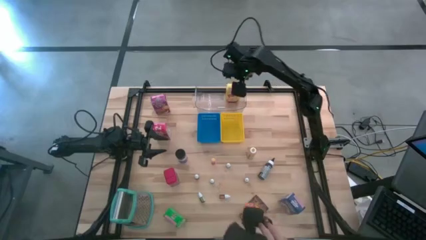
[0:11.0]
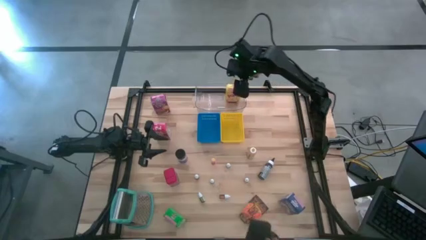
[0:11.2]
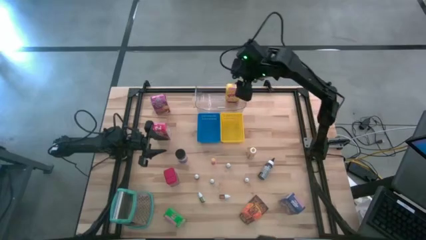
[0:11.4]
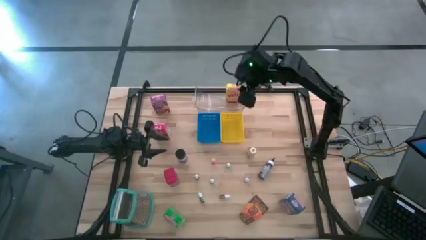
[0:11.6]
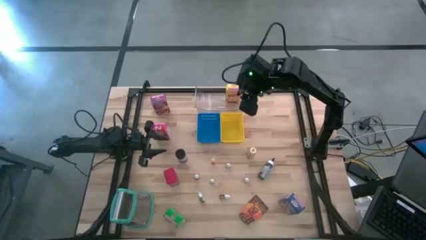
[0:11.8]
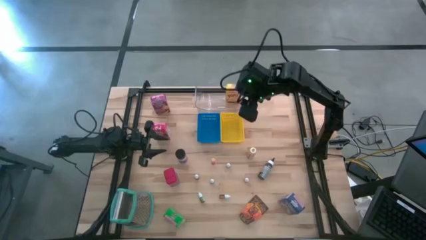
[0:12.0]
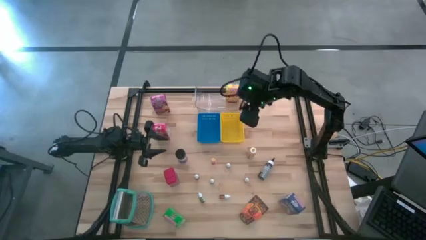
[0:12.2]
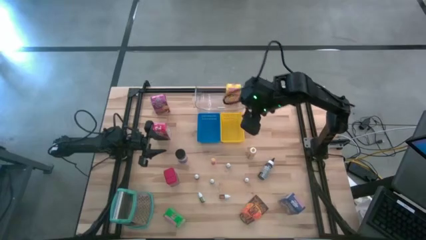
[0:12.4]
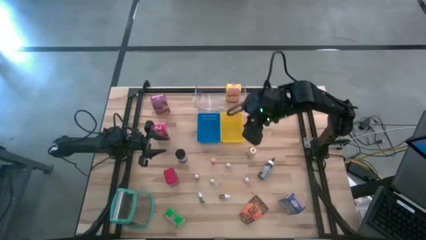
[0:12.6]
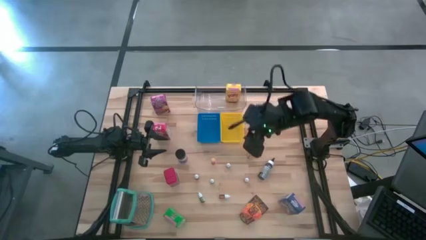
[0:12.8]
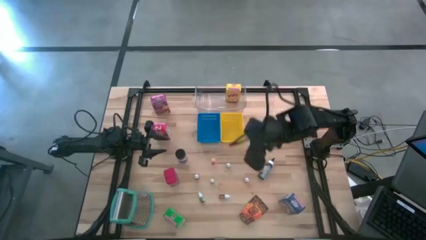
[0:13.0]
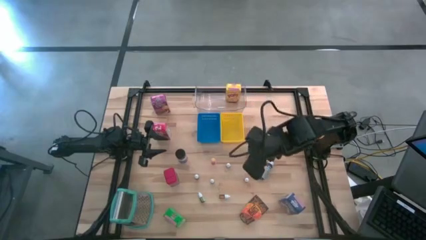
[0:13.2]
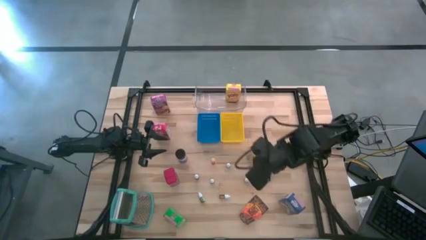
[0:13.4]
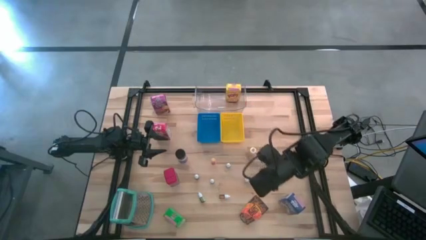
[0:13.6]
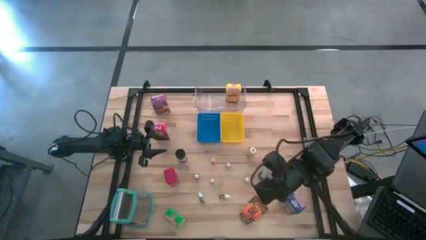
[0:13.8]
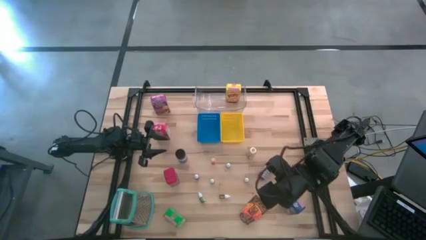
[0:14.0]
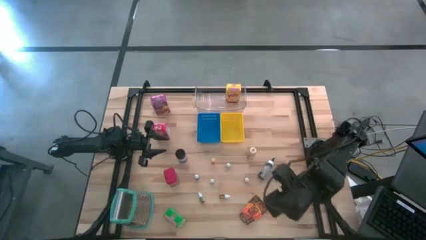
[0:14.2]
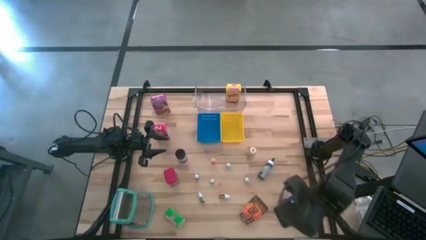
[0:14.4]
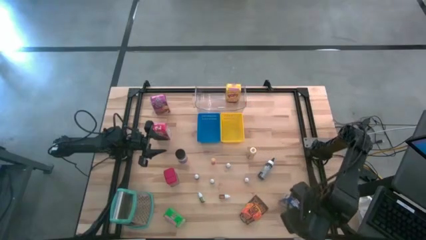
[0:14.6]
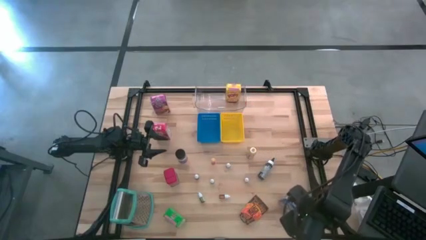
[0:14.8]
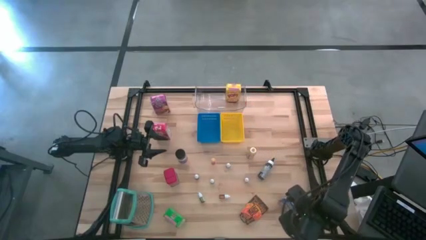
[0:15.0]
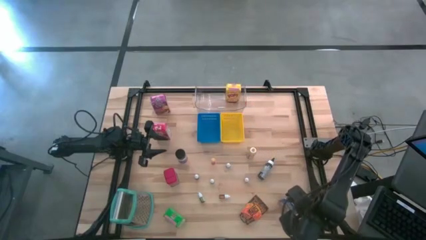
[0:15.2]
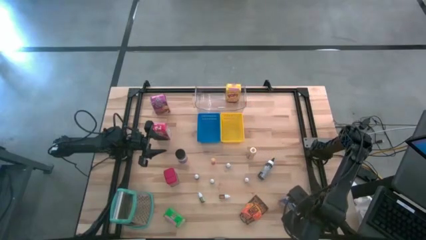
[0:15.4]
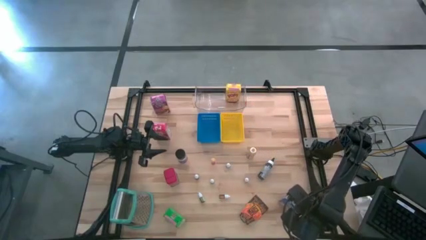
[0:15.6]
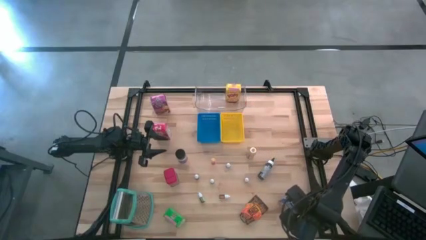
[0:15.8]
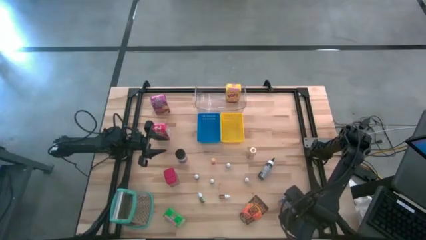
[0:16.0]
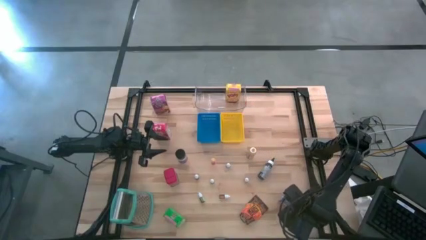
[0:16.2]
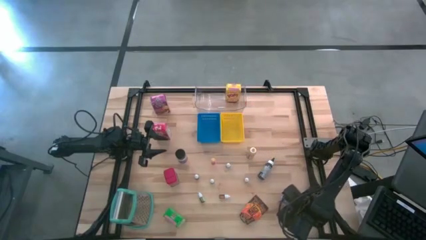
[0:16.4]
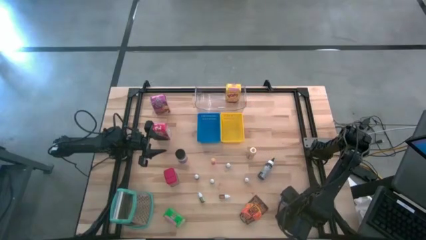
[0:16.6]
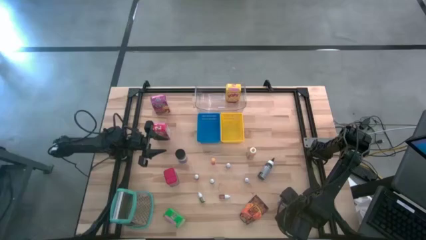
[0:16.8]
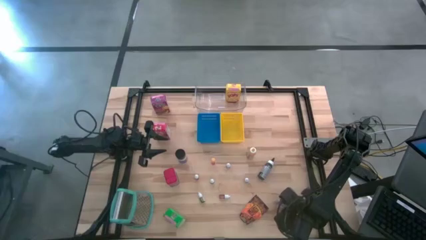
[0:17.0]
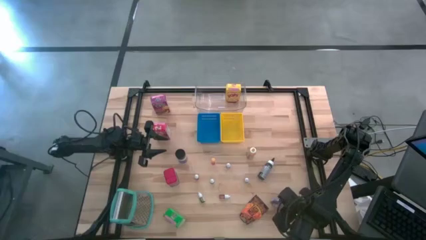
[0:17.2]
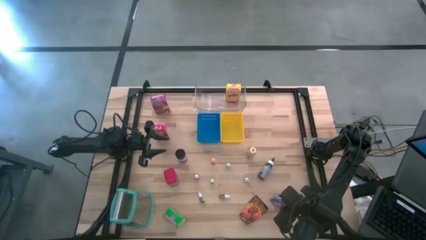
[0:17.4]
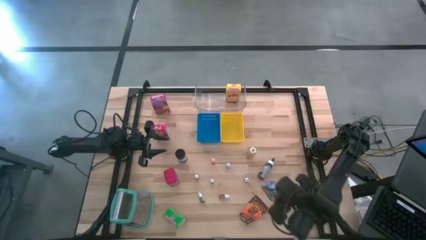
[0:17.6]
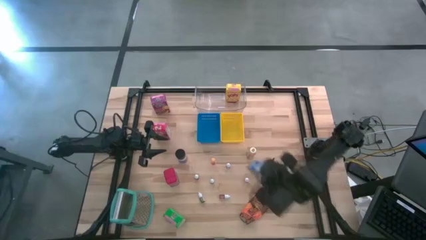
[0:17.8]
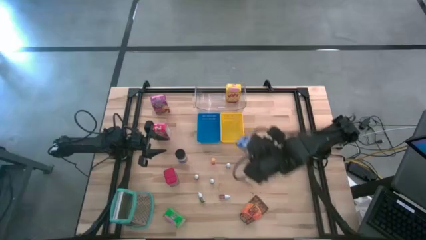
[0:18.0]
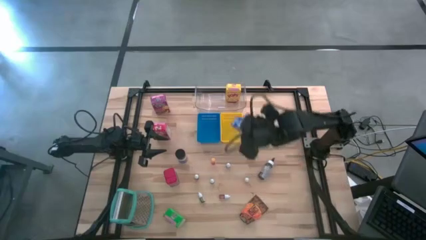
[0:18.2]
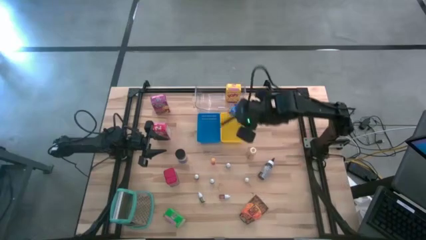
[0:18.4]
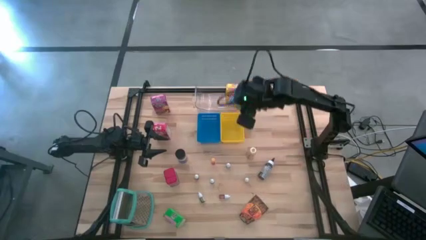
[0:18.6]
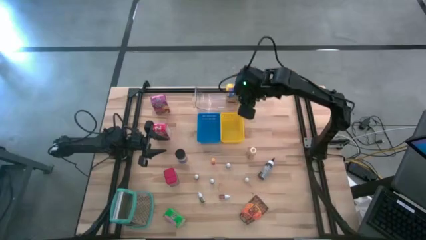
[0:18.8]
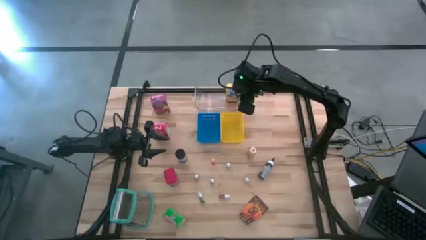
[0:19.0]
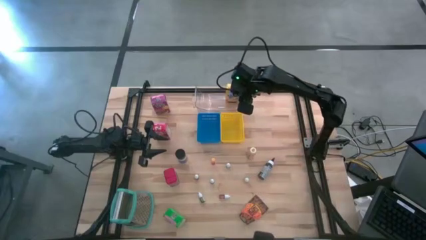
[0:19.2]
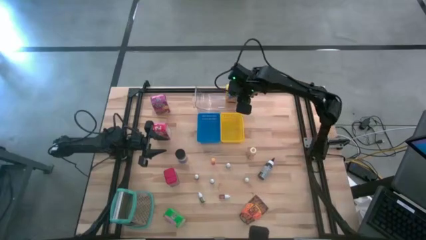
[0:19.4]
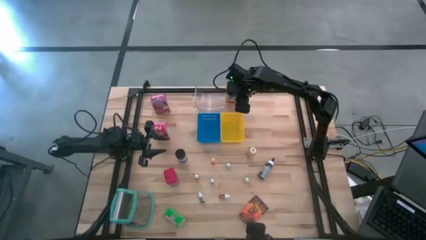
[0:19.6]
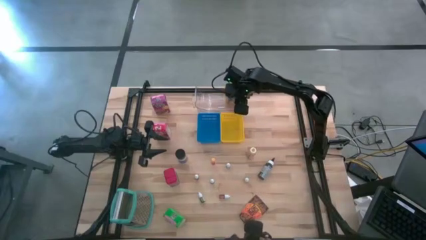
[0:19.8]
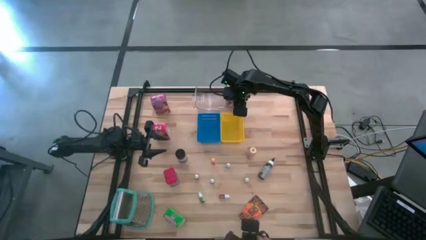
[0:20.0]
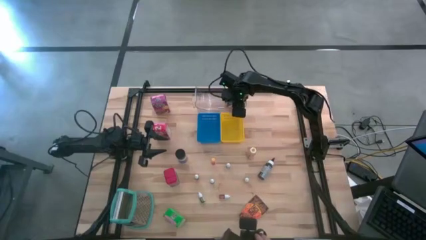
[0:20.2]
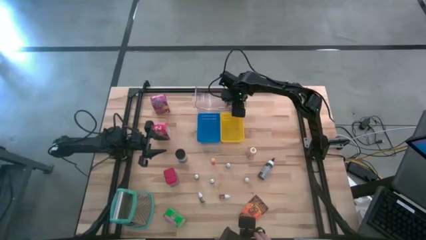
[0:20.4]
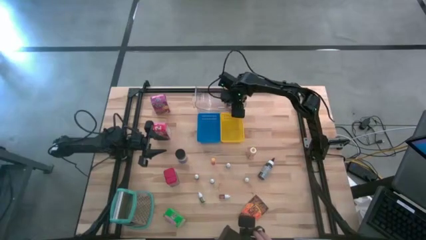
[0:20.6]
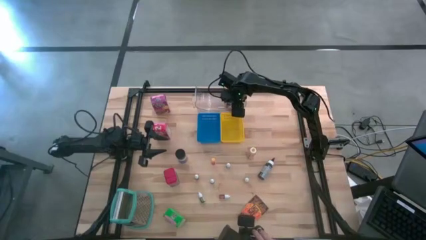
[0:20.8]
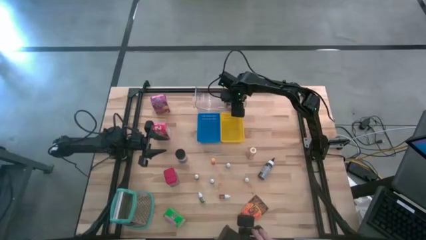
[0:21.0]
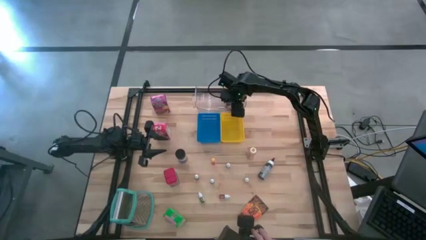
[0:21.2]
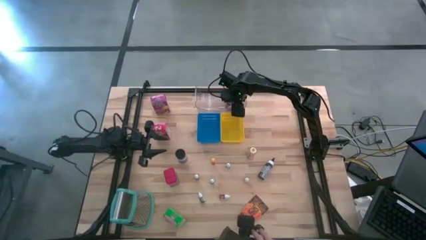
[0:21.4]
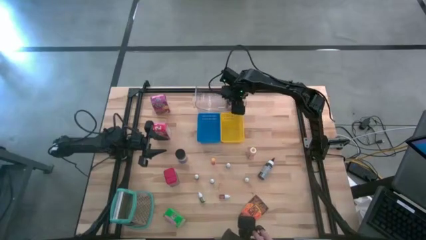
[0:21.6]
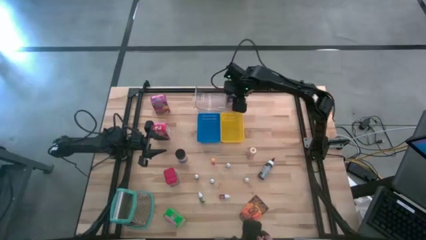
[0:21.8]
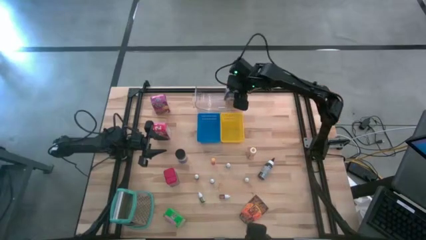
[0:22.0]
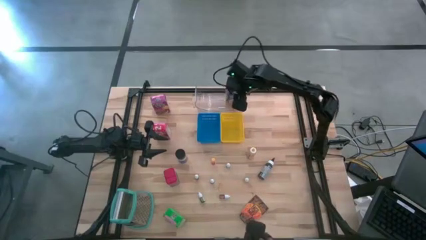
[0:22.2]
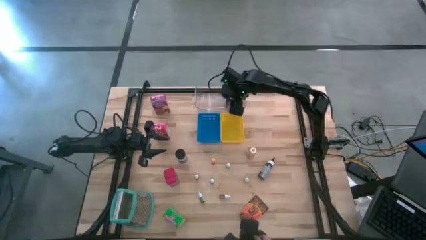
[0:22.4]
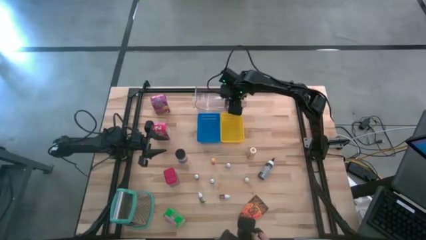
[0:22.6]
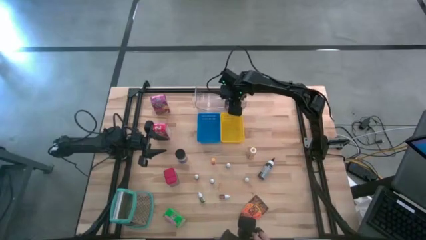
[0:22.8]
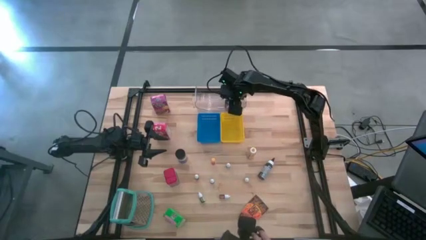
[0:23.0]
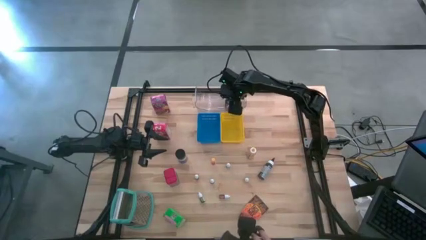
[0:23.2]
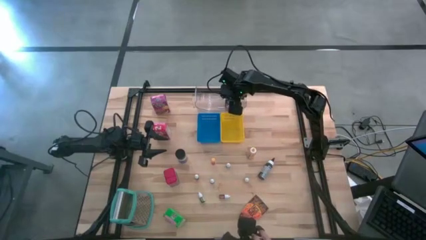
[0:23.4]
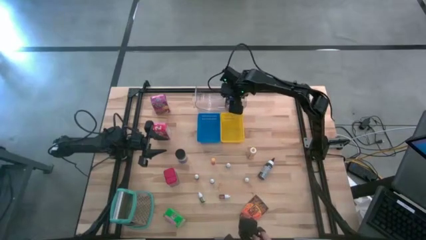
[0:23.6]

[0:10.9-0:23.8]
Task: Pick & Place Kitchen Items
Put the blue cereal box into the transparent bin

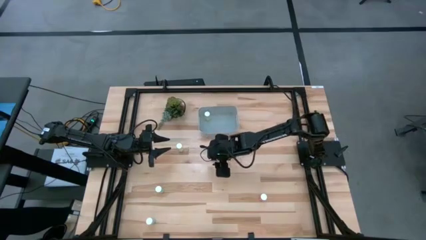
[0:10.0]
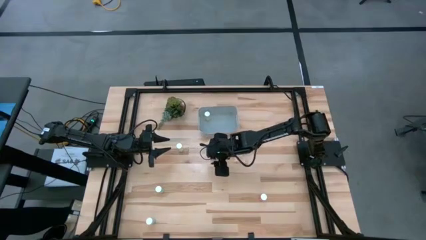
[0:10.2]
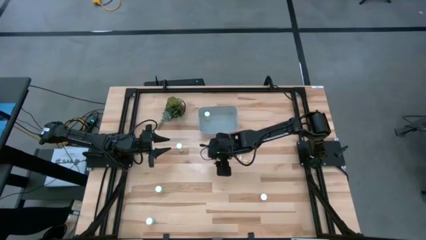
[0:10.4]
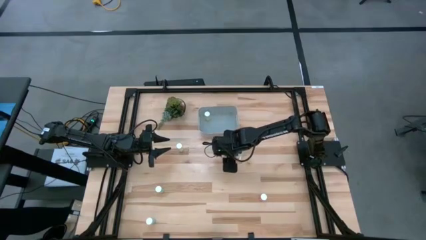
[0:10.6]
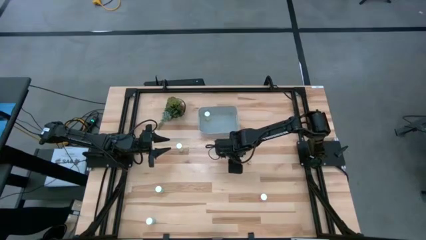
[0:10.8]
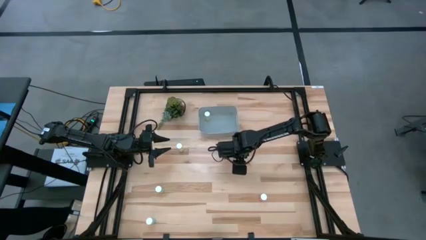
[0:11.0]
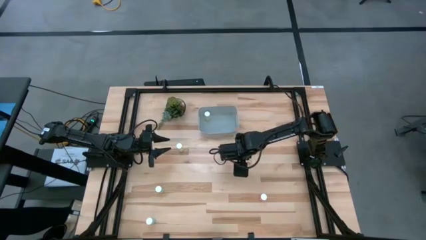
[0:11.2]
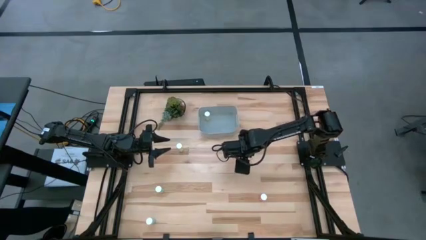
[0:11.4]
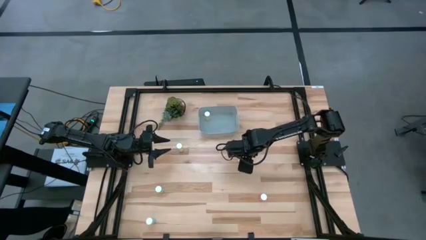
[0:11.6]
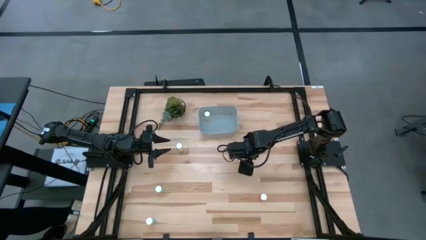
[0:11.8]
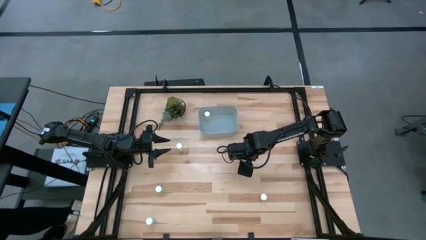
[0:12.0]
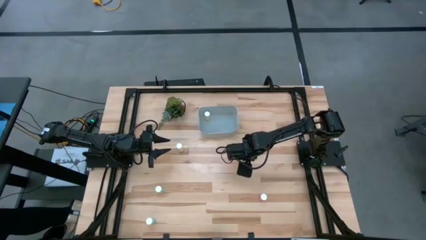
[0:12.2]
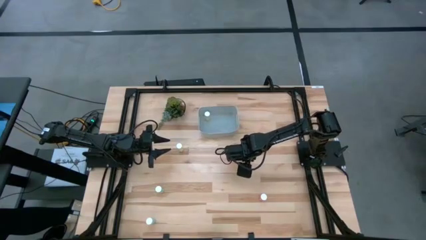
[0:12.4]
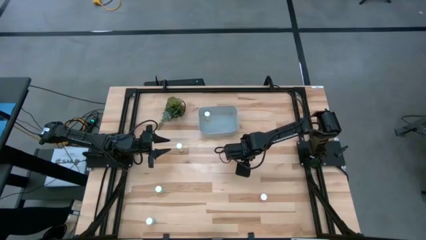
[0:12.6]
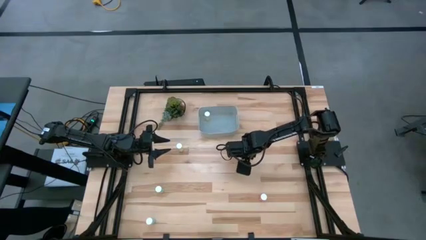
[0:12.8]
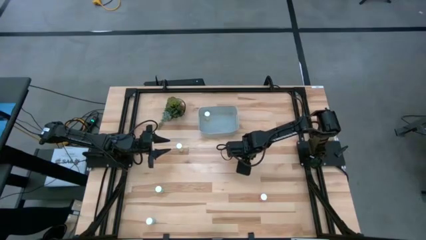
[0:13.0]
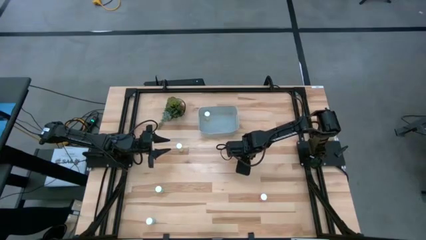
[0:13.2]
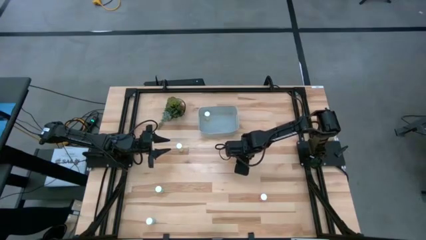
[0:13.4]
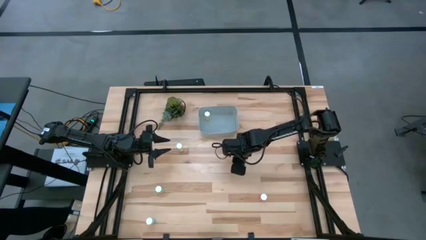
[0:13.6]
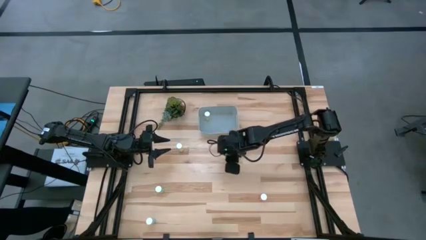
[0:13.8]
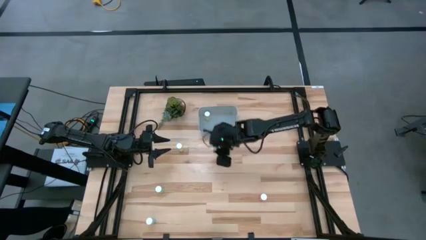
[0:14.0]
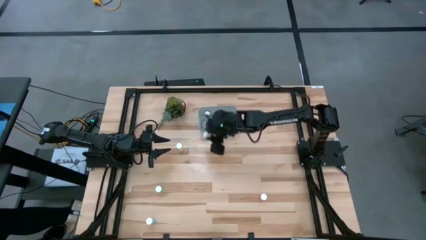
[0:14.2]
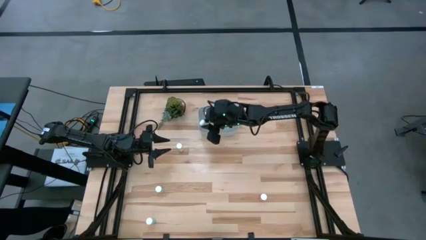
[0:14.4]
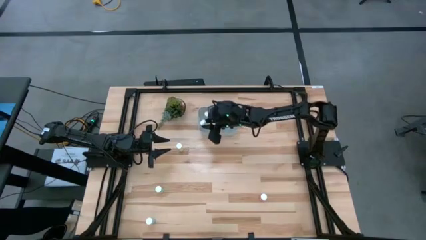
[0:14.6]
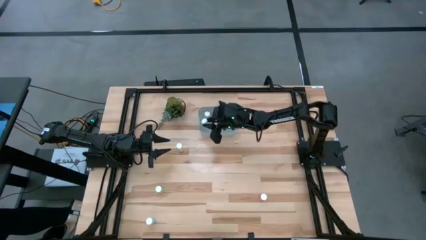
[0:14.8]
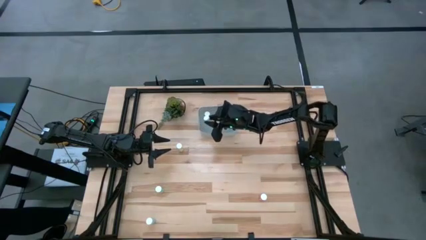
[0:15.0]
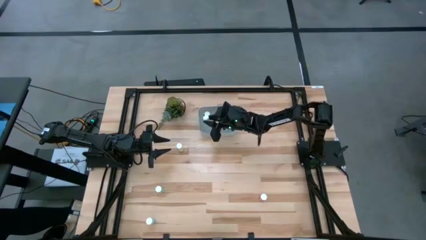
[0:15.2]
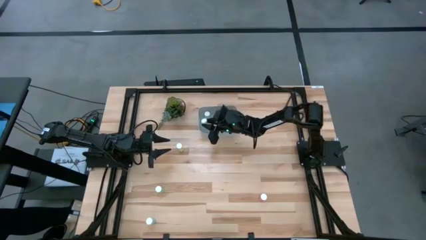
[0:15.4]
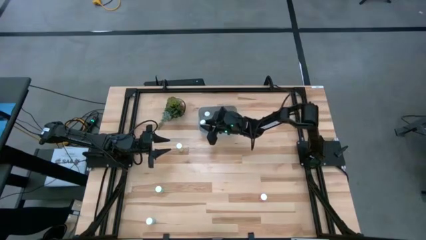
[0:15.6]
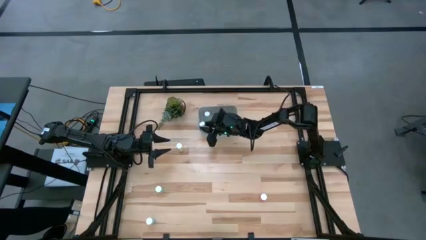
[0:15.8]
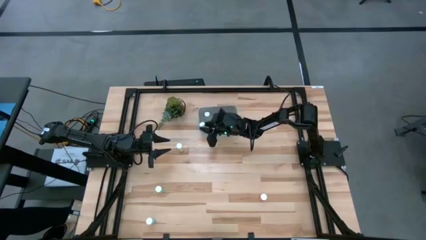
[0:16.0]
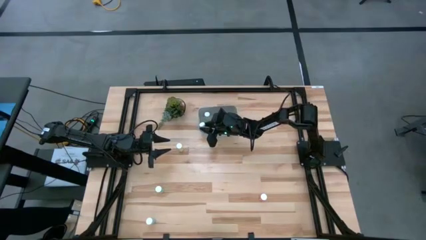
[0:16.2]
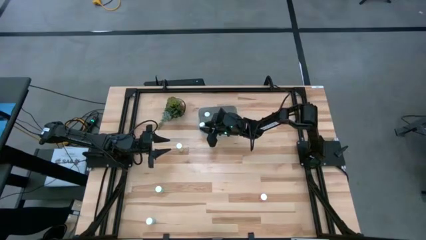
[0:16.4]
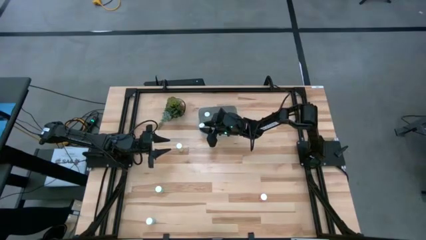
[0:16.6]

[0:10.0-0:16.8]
Task: Pick and place pill bottles into a basket
Put the right yellow pill bottle into the bin
